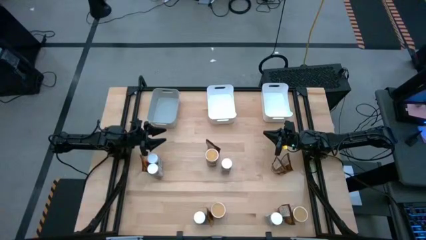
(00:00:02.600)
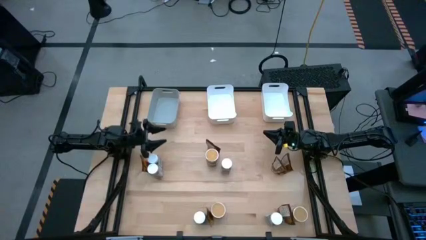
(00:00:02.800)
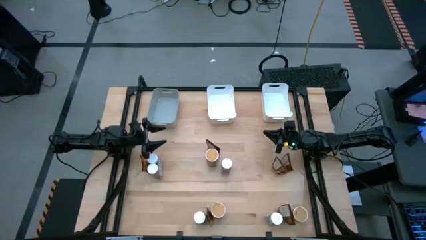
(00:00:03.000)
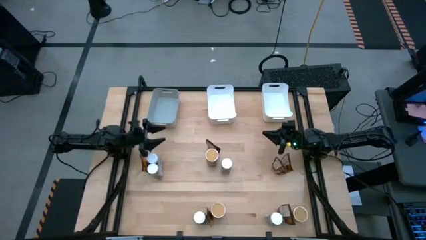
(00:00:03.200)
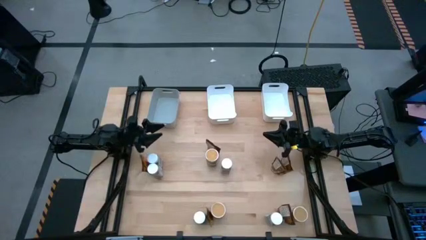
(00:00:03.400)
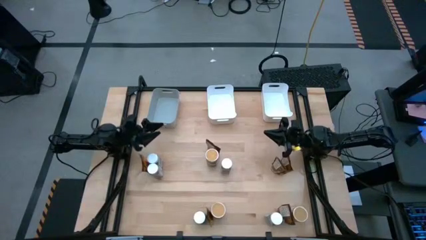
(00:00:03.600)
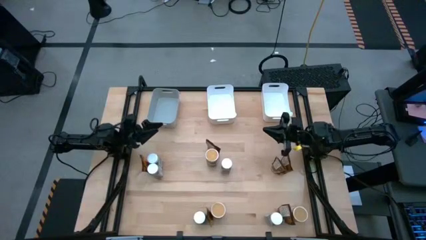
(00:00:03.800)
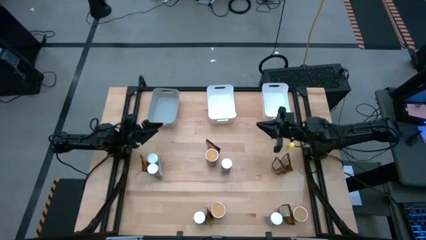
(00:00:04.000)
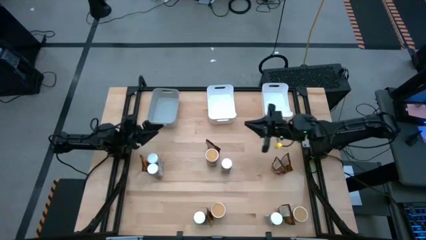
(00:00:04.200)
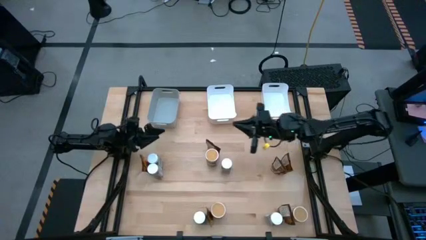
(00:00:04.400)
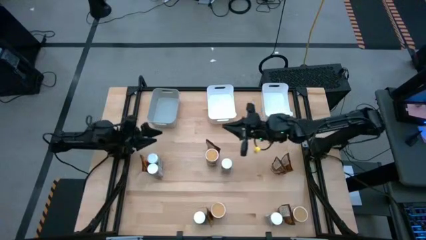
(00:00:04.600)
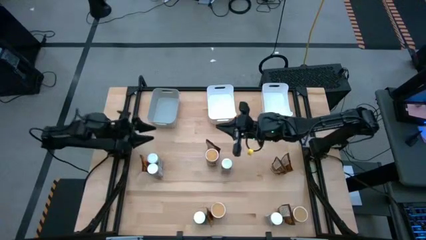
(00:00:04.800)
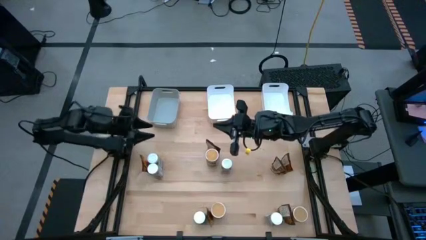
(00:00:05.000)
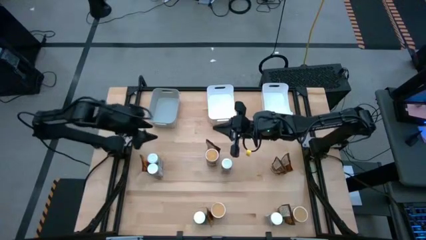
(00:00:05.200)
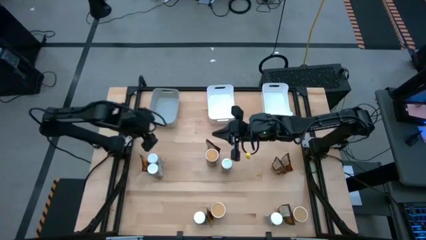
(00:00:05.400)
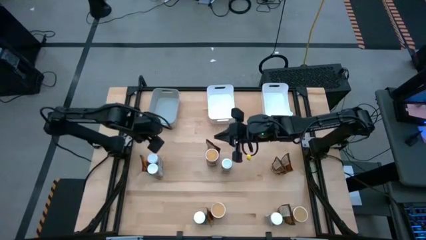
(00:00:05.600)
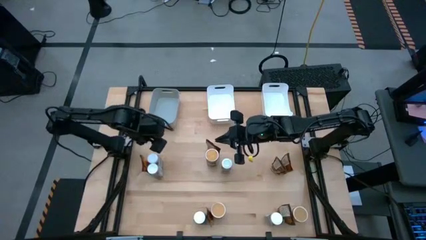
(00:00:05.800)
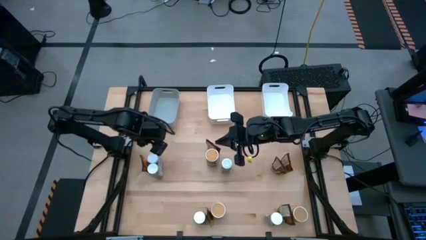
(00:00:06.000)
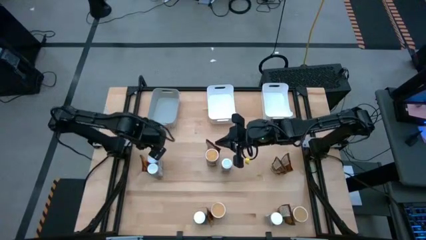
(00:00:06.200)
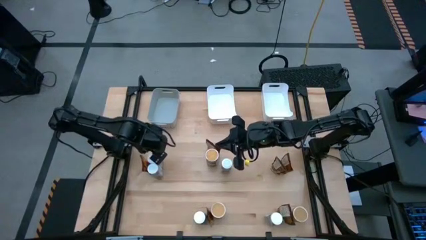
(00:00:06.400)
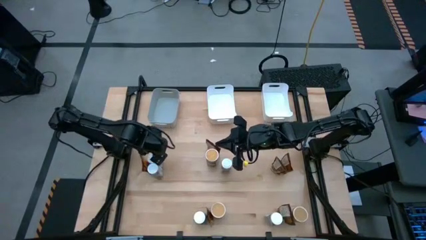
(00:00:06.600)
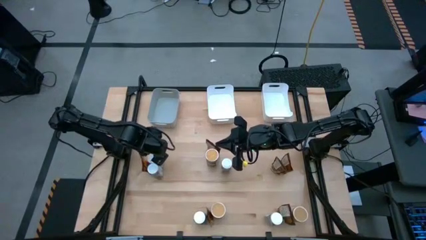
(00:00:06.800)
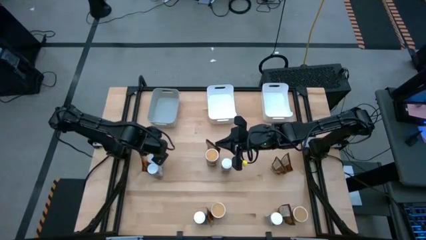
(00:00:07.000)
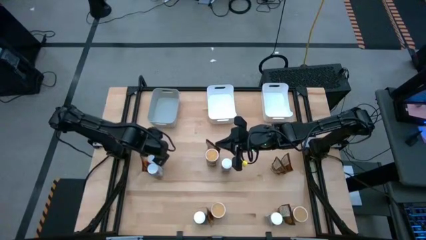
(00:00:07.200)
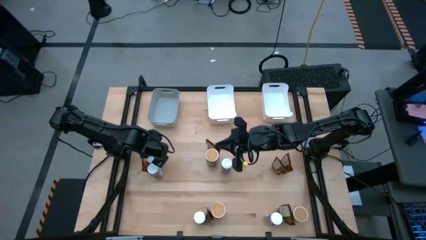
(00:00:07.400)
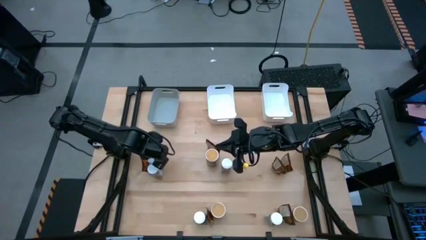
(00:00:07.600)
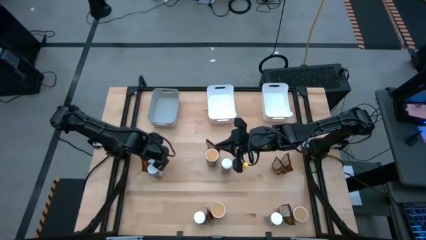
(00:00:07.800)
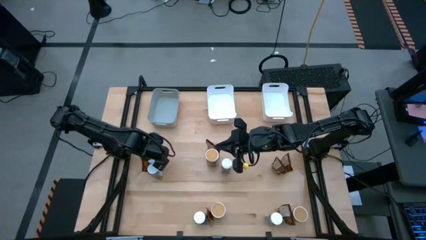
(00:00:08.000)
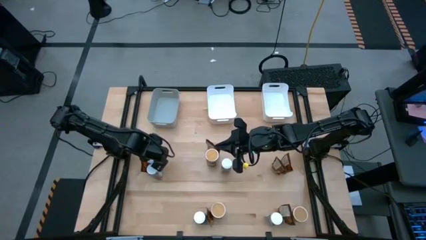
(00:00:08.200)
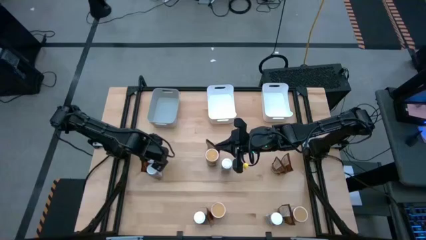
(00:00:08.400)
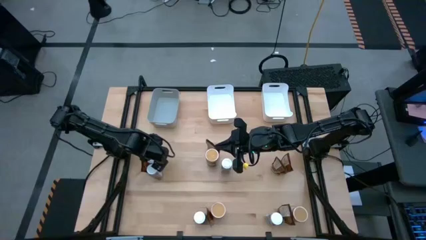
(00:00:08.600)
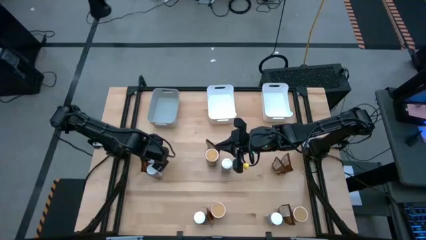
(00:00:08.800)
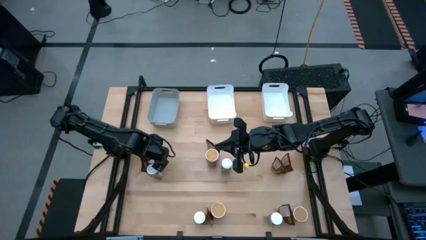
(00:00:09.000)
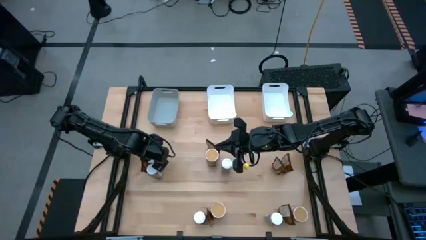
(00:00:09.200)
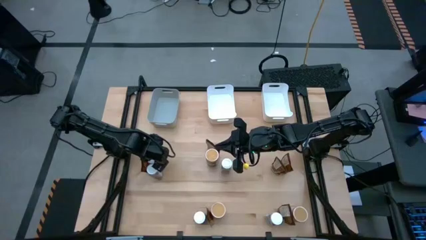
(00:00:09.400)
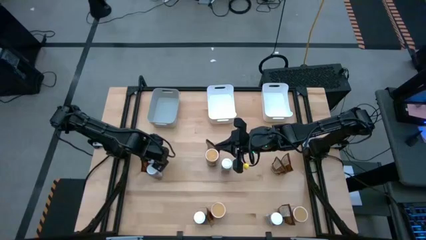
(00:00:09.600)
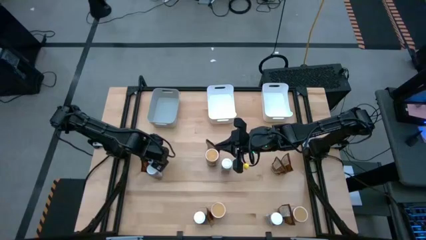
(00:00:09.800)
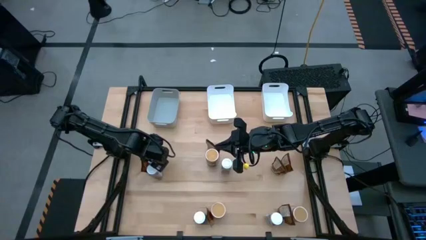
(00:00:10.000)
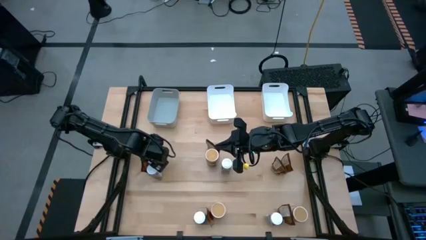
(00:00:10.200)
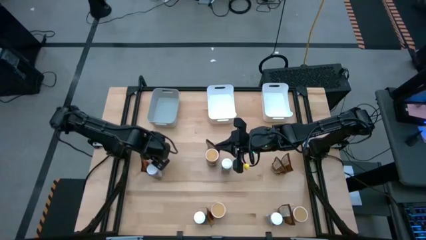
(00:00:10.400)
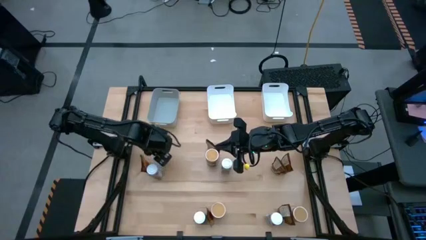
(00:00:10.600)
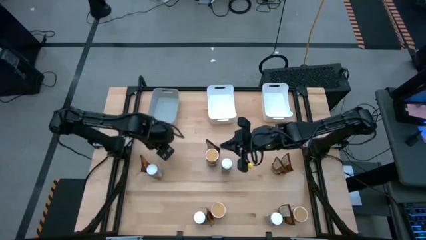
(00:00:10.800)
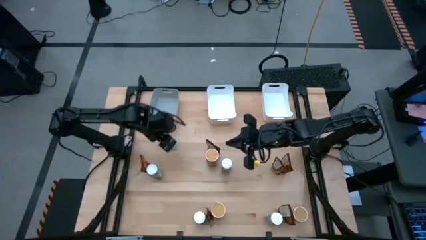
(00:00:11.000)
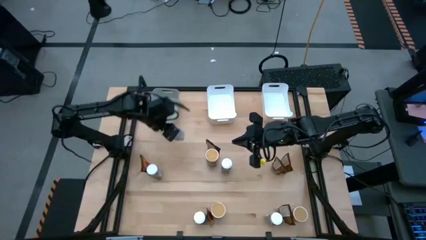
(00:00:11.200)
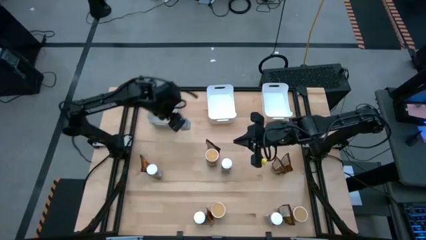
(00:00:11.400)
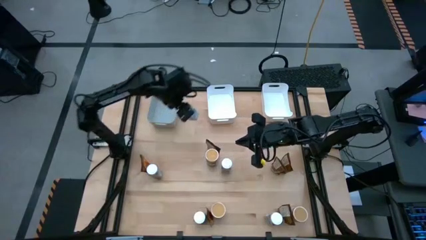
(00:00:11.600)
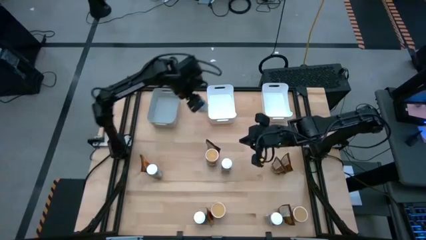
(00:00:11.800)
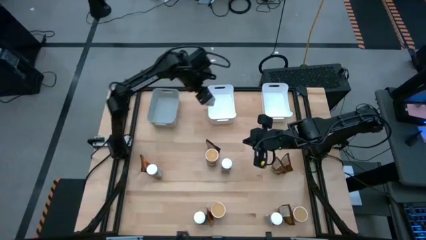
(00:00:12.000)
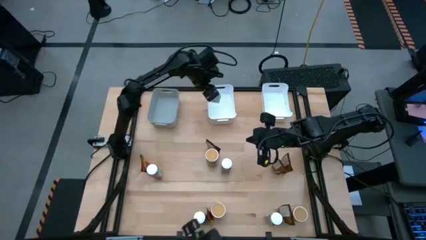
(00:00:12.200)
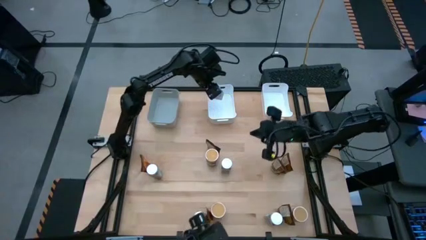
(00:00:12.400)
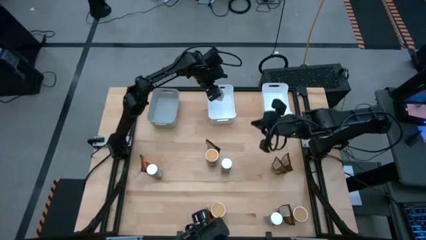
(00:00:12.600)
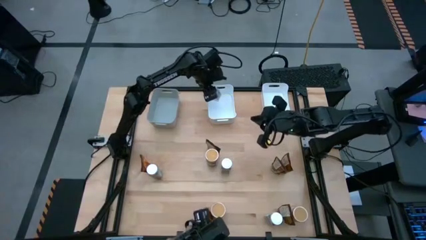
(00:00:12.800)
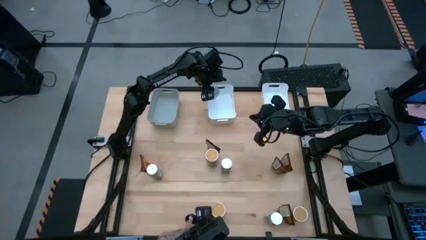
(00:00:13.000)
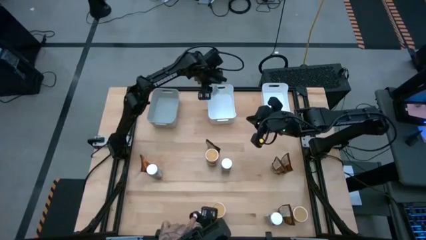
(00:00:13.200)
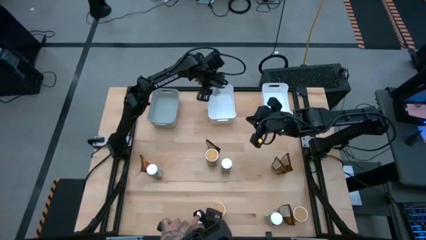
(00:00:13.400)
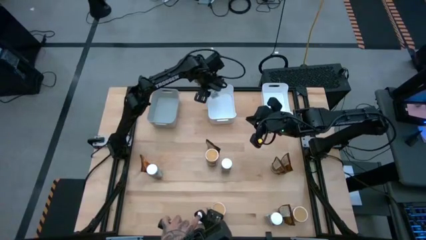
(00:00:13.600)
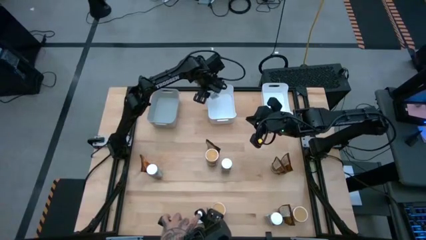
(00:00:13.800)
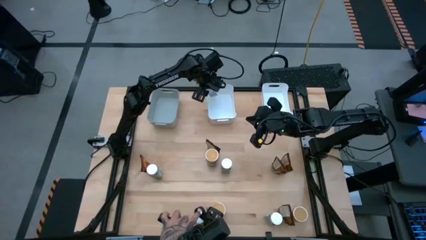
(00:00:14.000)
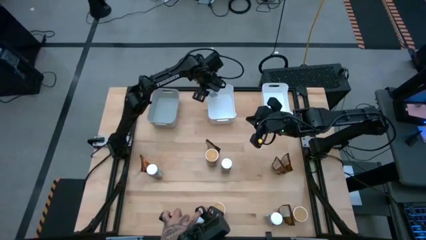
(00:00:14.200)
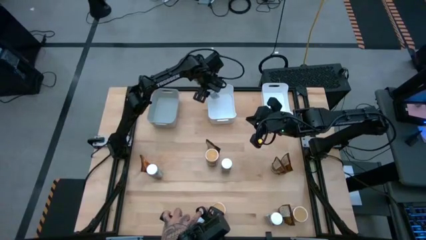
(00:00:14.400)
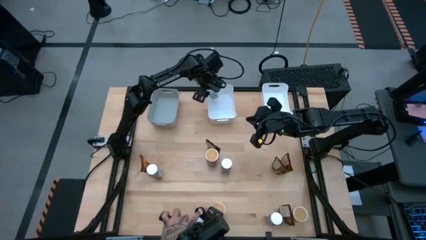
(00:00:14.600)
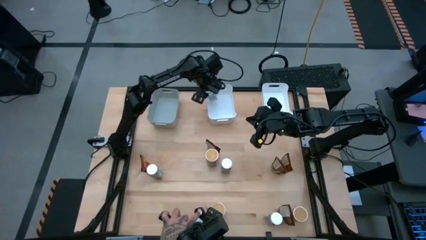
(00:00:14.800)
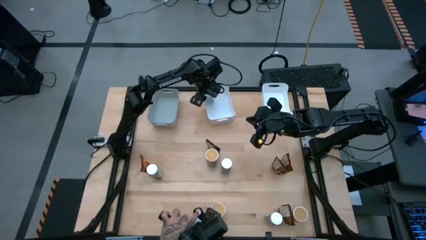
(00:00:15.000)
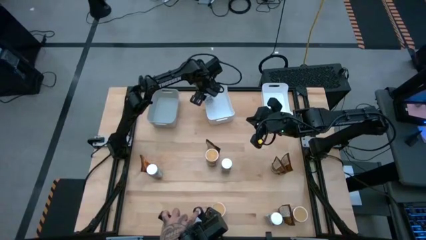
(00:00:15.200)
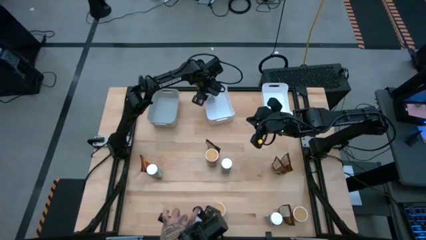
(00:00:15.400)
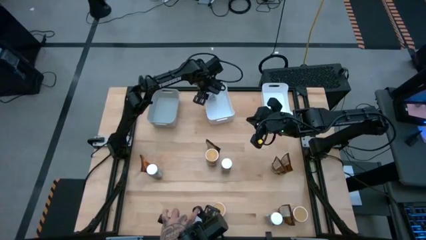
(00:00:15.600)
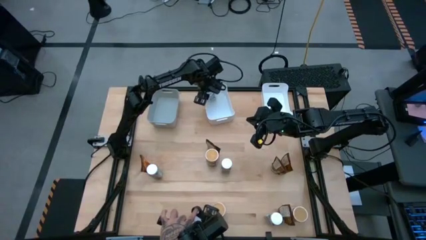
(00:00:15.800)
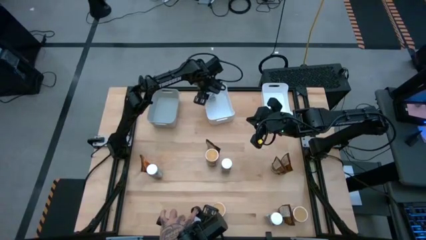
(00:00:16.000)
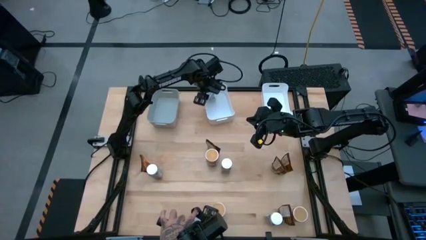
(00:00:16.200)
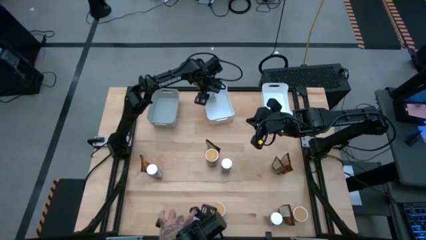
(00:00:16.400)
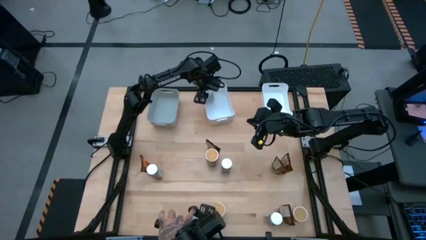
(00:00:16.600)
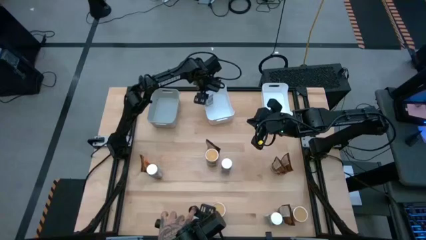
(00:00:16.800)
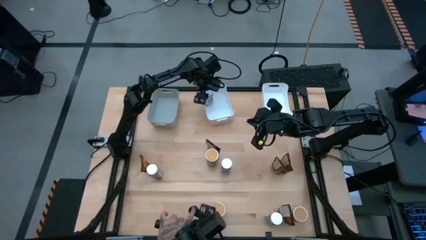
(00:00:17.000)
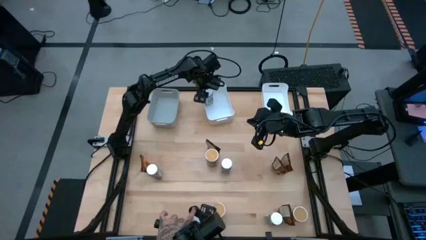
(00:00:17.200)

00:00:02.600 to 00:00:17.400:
Task: Sort spices by type
Put the white seasoning bottle into the left white bin

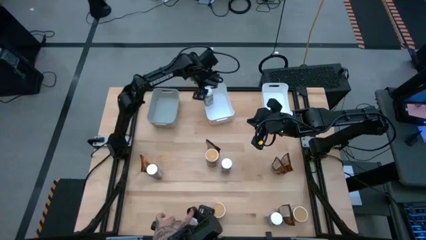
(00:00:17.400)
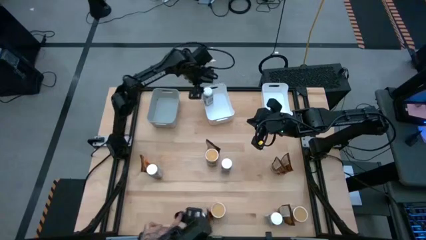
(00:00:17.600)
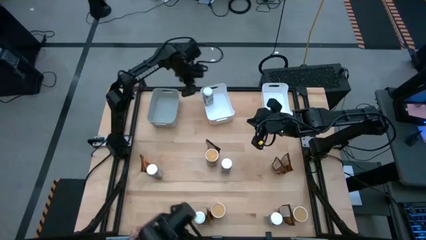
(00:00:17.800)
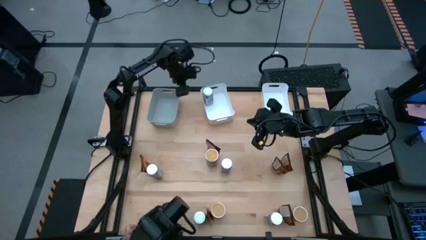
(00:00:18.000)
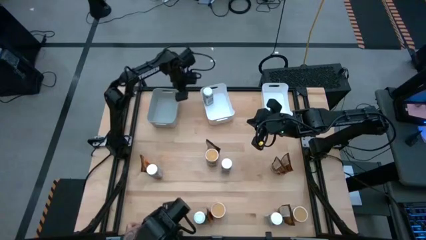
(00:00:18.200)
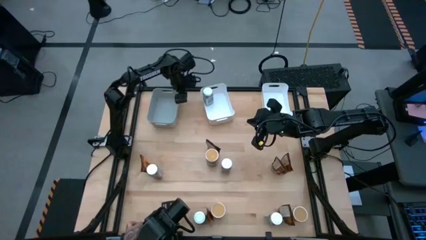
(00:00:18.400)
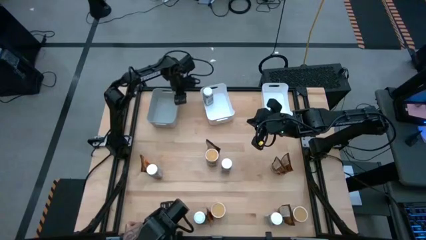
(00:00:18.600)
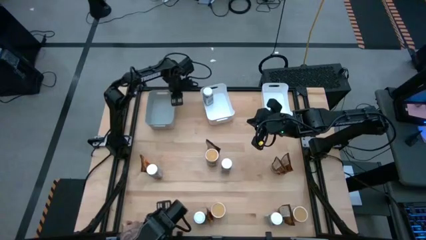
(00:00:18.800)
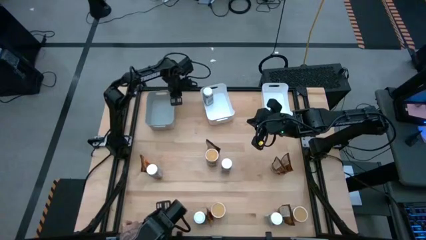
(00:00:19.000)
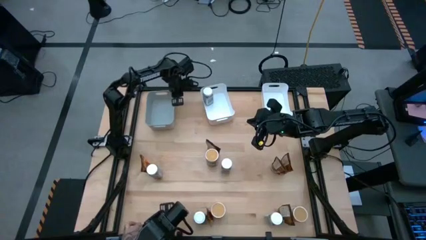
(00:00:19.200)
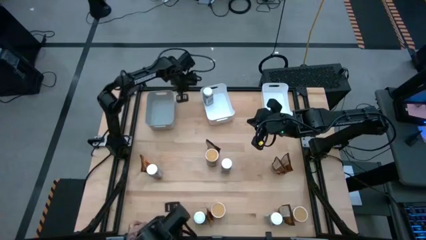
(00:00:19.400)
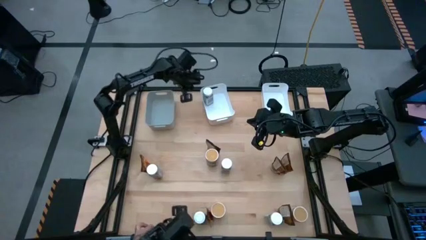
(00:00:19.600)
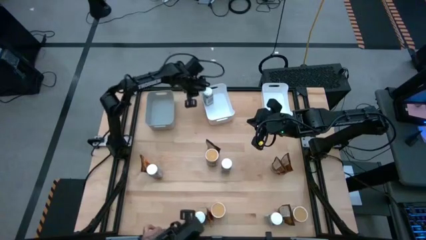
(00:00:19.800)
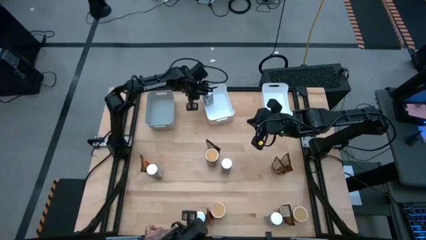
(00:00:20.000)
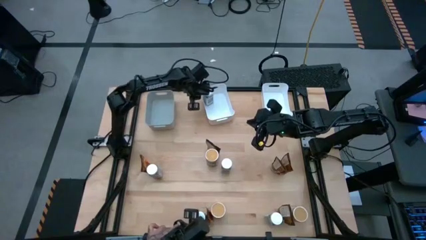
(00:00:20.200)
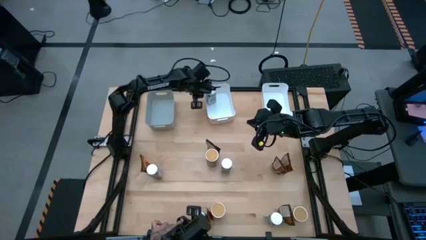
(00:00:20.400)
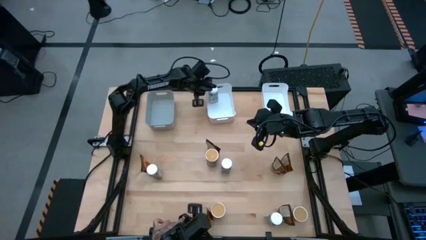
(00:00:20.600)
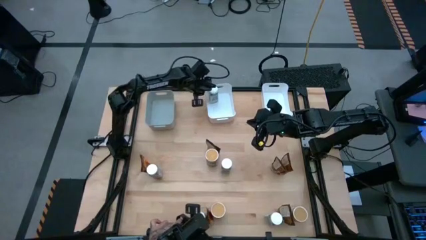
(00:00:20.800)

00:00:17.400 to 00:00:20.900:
Adjust the bins
